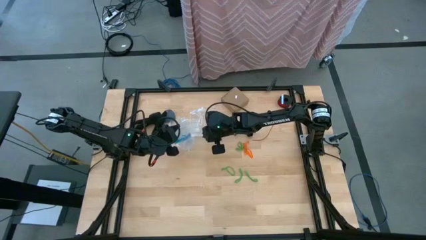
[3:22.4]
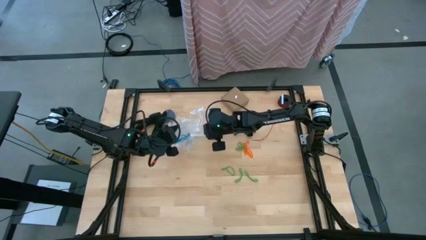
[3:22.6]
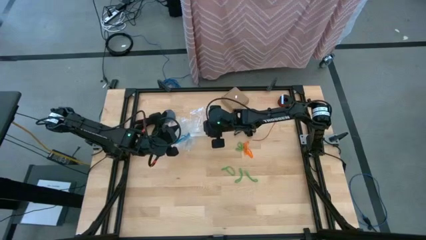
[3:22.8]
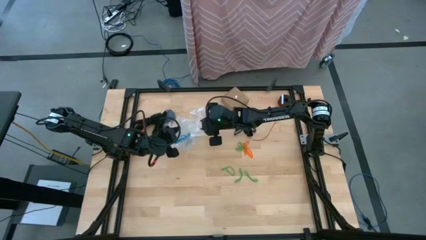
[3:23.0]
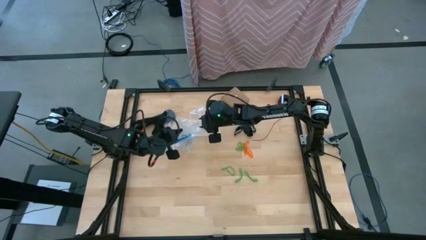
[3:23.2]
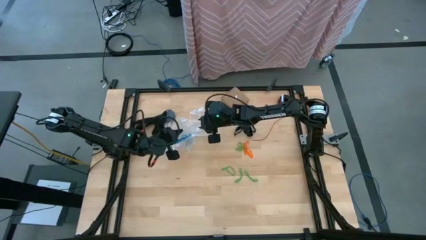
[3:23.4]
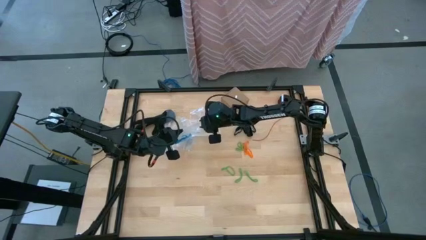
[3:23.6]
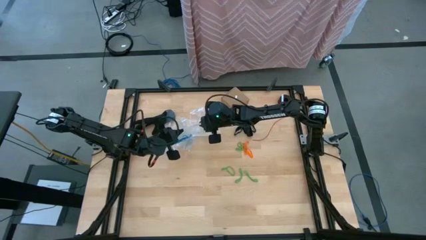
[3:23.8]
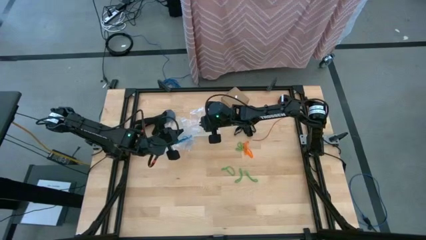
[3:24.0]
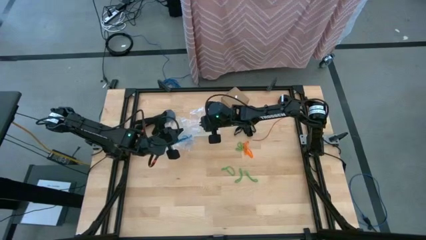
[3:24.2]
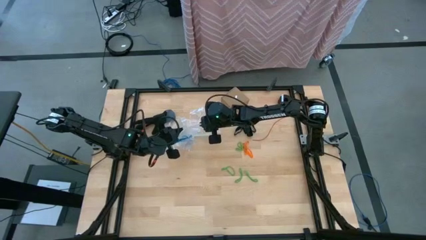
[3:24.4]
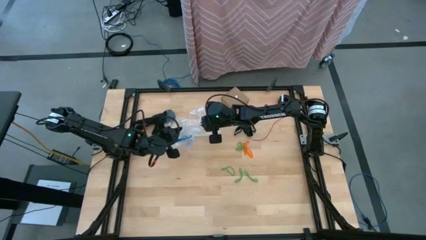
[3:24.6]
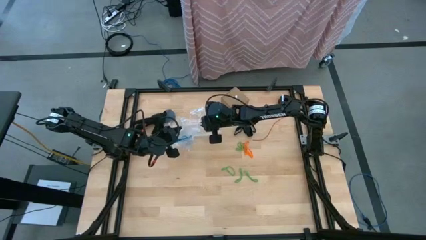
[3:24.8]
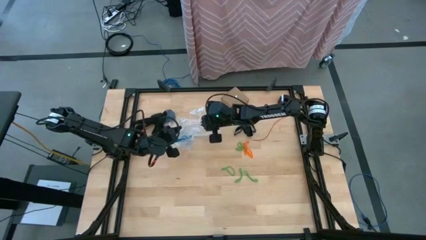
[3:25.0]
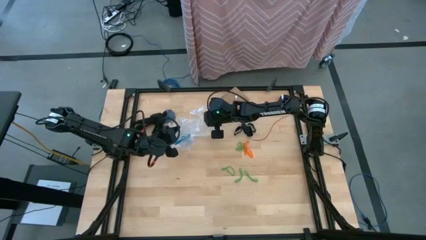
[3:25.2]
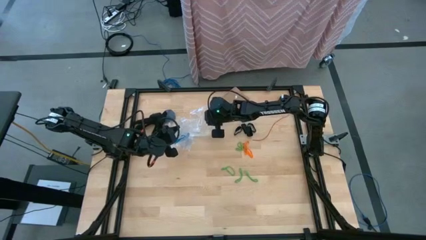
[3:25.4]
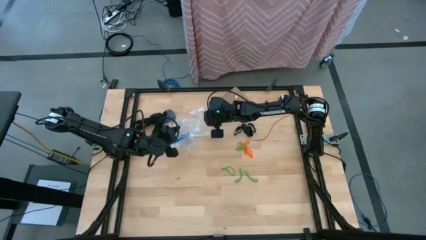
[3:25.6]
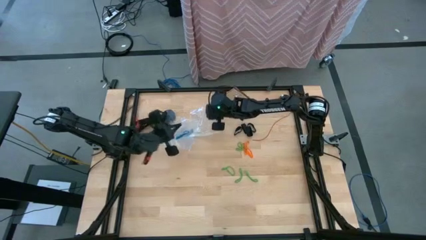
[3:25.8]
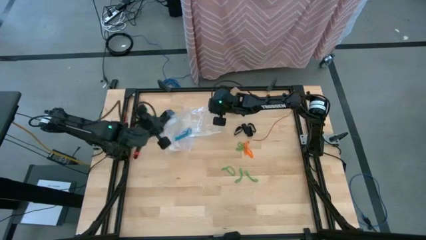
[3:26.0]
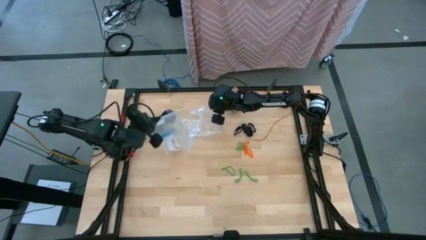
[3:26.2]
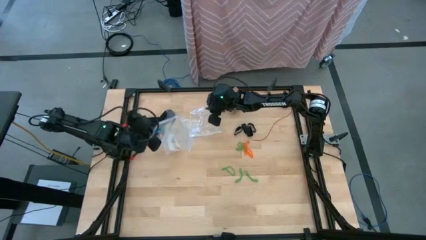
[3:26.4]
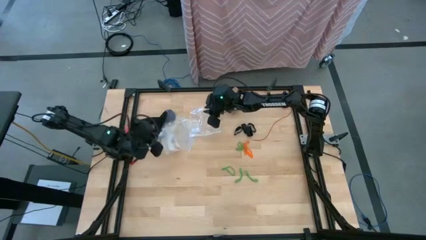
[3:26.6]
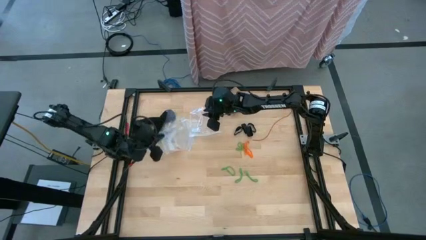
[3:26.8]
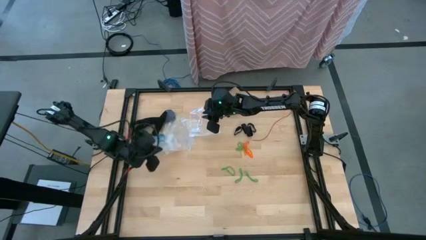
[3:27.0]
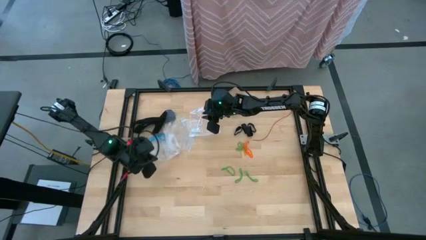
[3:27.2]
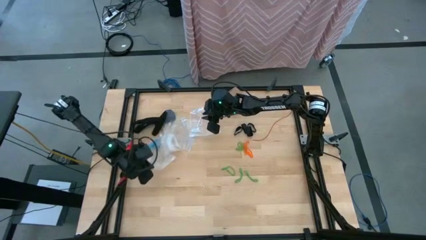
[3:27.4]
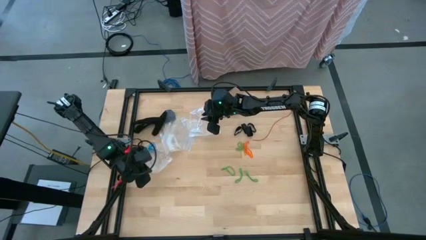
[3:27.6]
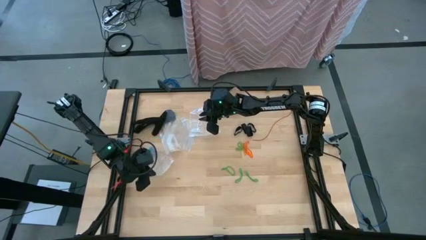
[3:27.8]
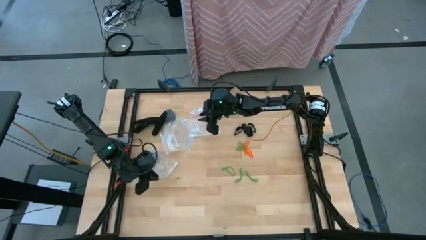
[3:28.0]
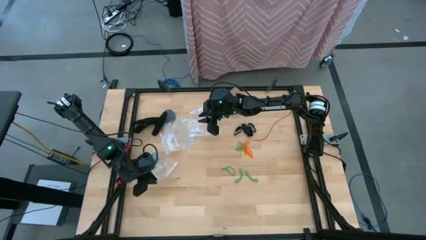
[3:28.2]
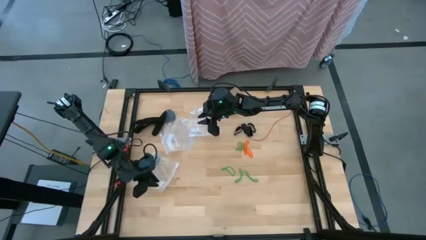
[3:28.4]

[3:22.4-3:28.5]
Task: Sort rubber bands
Close the transparent zip bag

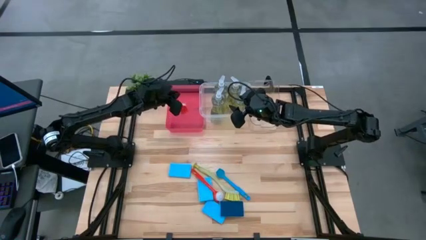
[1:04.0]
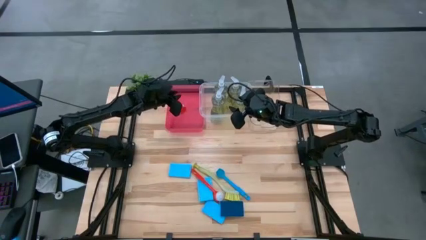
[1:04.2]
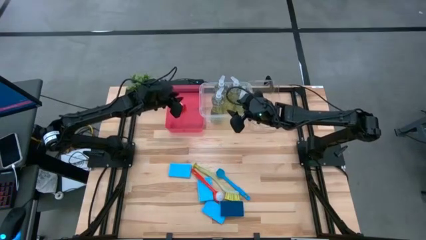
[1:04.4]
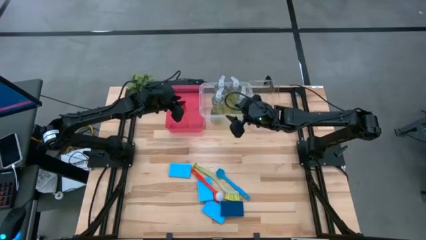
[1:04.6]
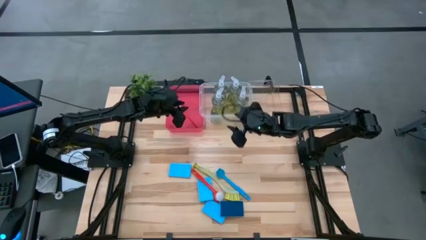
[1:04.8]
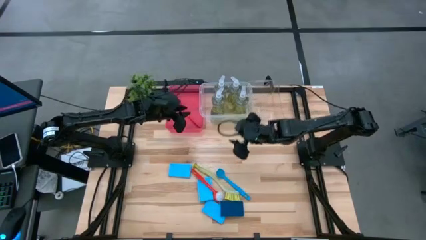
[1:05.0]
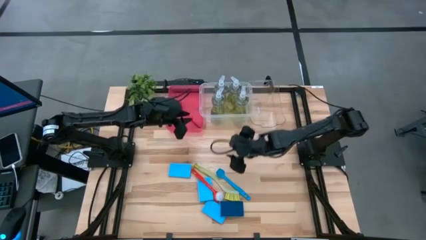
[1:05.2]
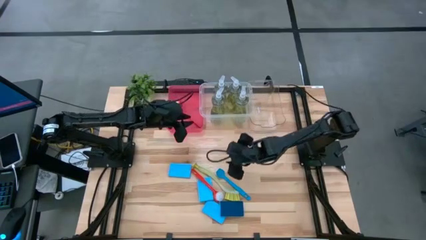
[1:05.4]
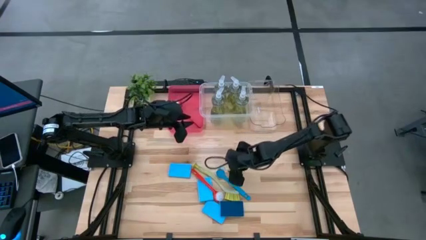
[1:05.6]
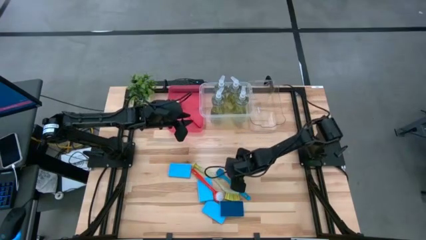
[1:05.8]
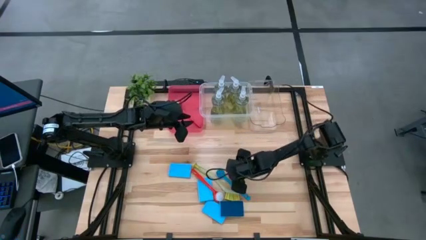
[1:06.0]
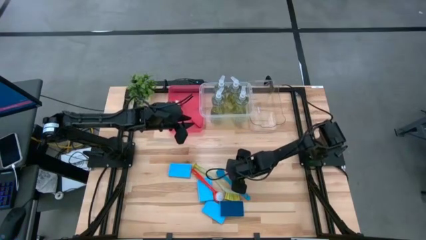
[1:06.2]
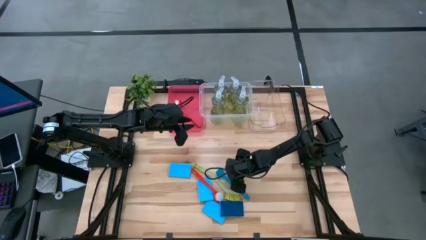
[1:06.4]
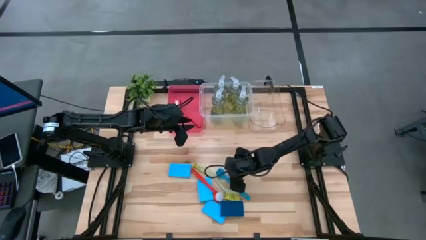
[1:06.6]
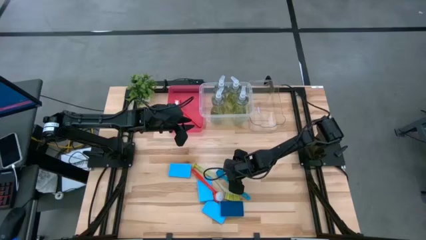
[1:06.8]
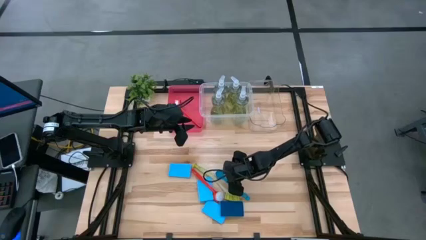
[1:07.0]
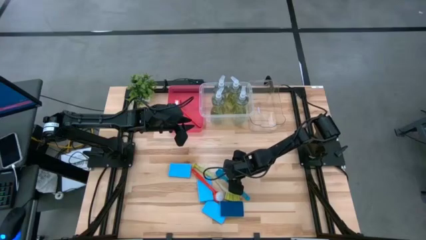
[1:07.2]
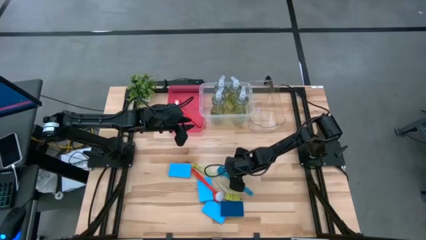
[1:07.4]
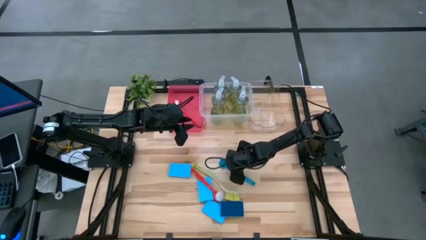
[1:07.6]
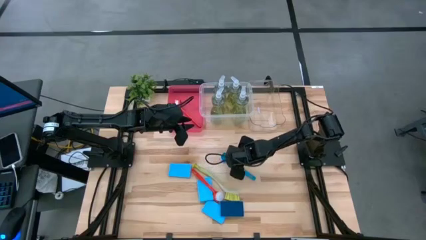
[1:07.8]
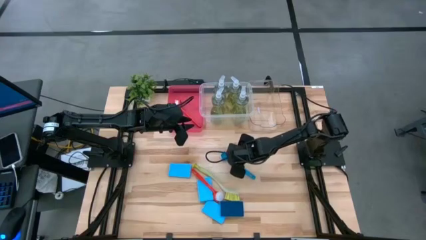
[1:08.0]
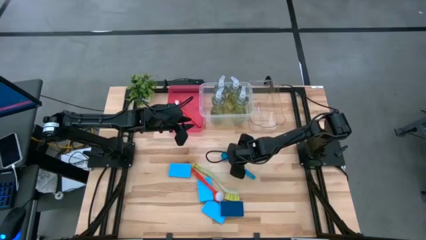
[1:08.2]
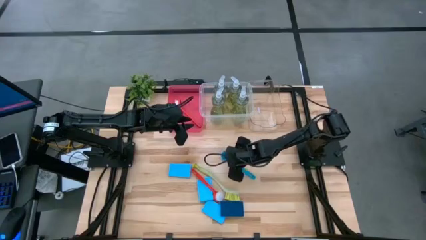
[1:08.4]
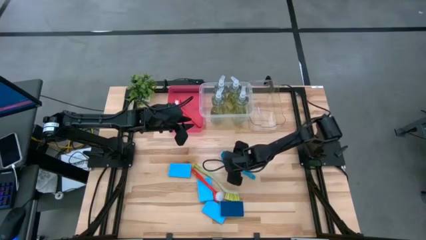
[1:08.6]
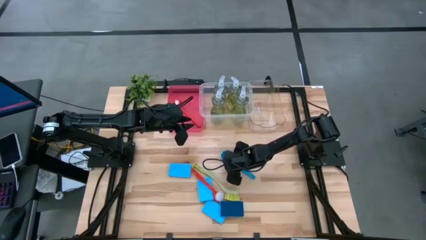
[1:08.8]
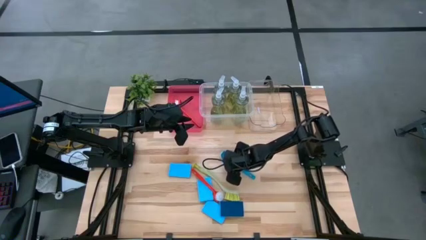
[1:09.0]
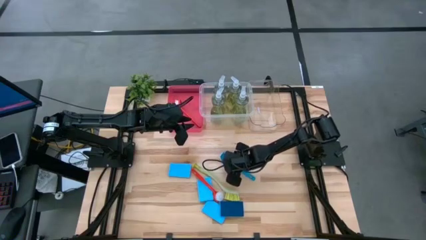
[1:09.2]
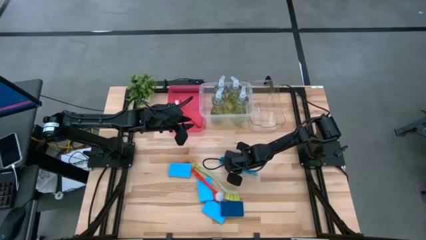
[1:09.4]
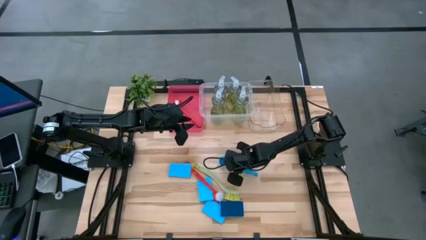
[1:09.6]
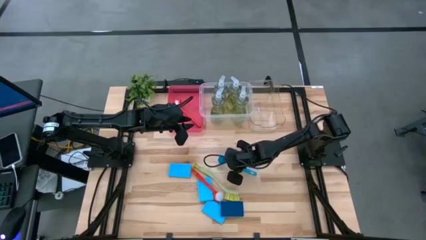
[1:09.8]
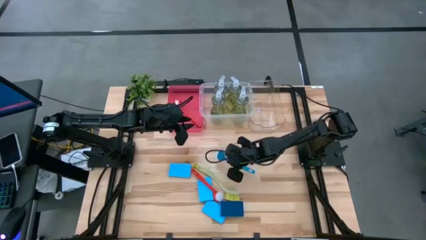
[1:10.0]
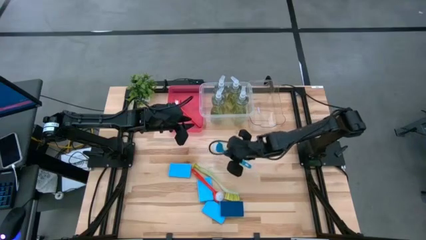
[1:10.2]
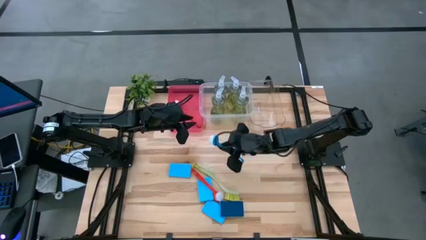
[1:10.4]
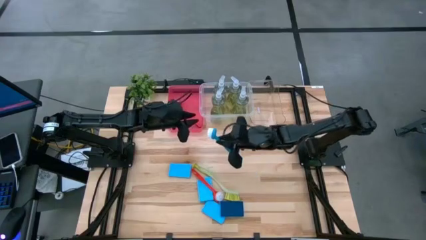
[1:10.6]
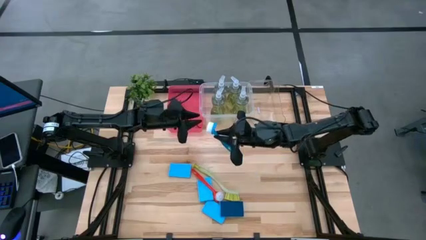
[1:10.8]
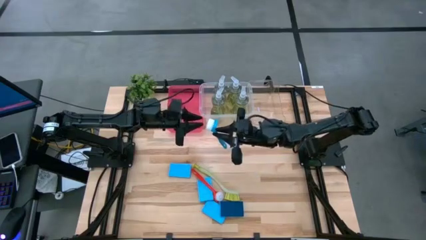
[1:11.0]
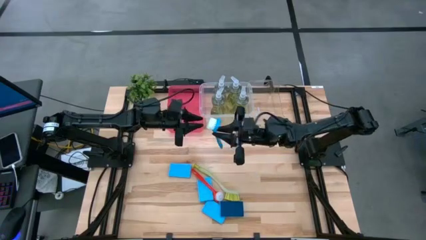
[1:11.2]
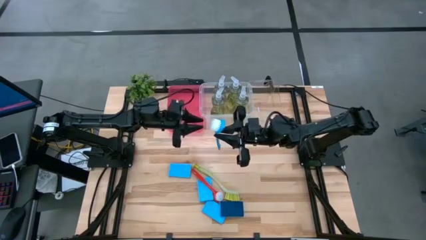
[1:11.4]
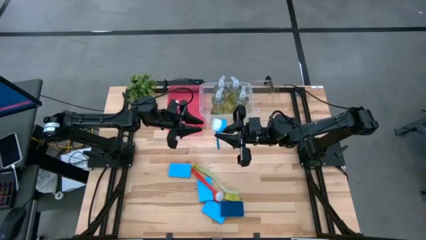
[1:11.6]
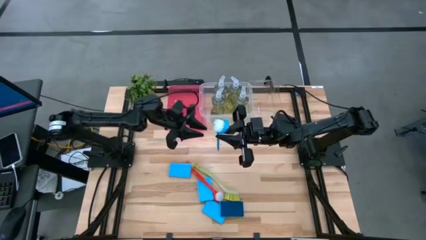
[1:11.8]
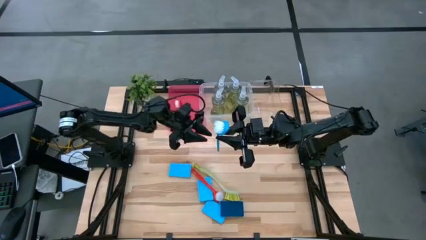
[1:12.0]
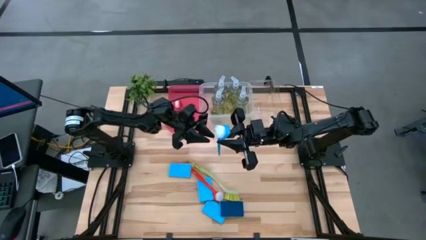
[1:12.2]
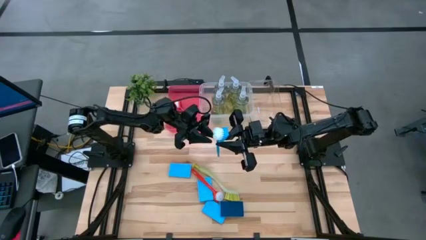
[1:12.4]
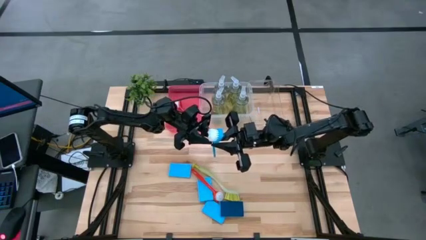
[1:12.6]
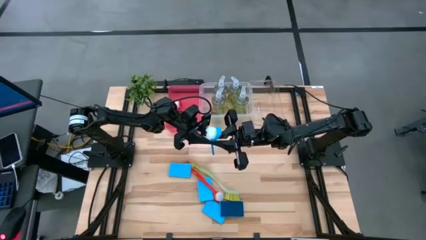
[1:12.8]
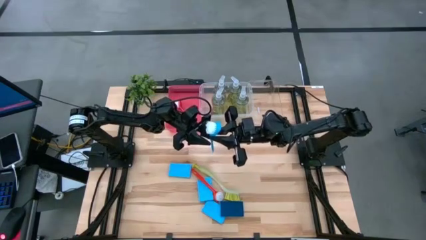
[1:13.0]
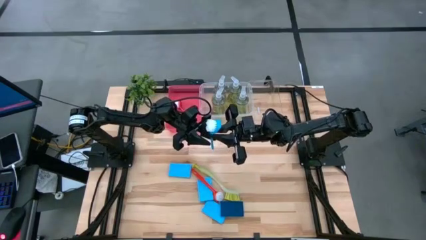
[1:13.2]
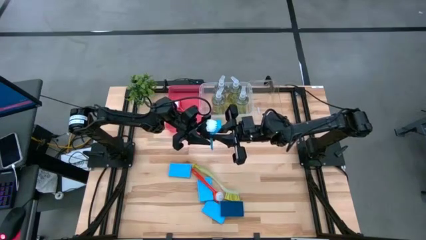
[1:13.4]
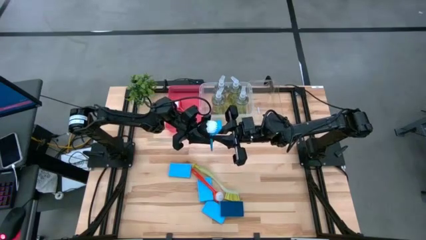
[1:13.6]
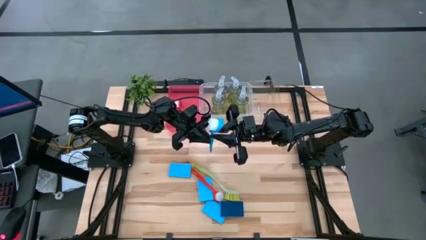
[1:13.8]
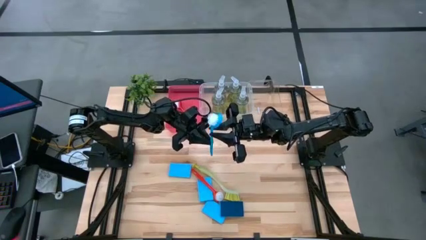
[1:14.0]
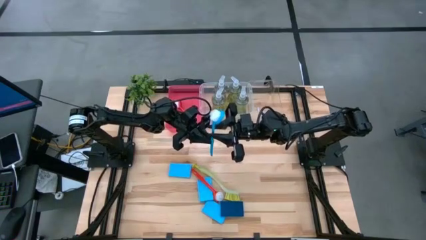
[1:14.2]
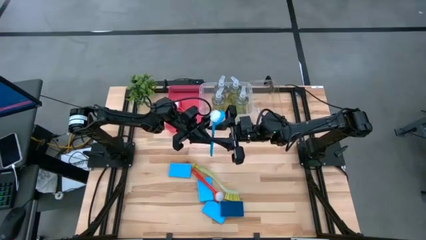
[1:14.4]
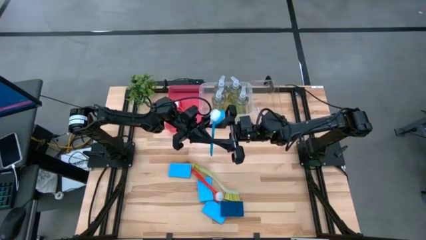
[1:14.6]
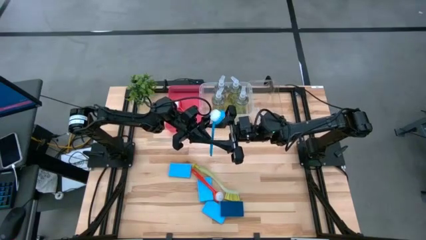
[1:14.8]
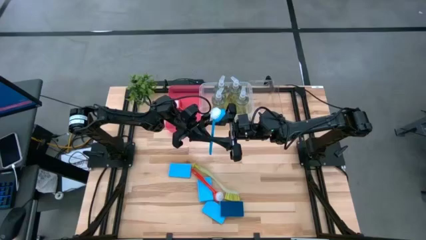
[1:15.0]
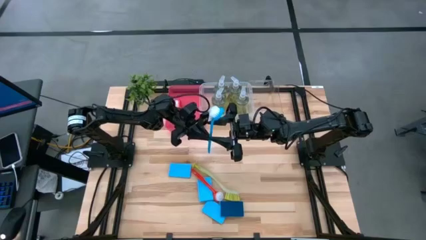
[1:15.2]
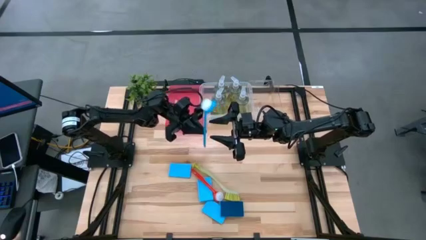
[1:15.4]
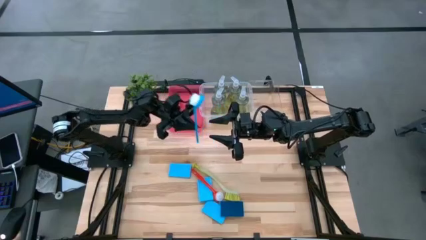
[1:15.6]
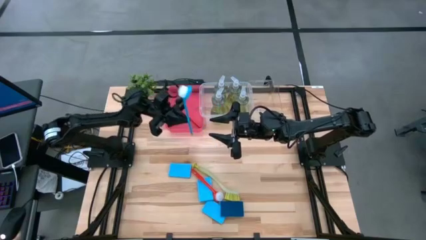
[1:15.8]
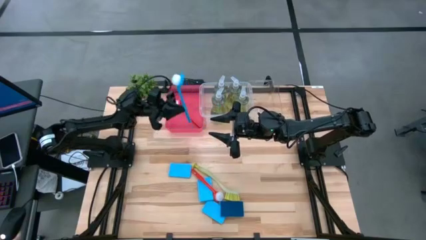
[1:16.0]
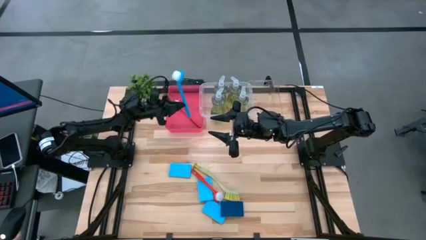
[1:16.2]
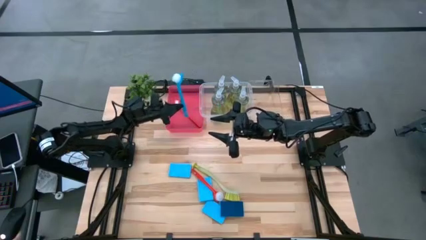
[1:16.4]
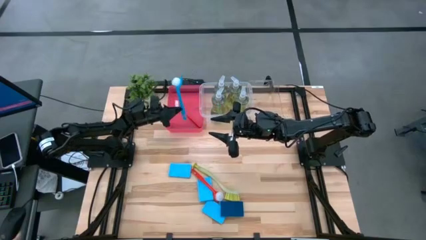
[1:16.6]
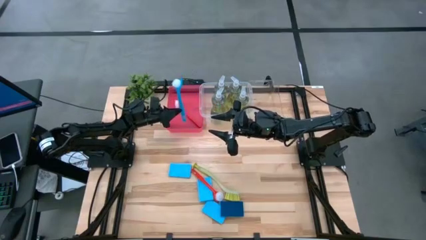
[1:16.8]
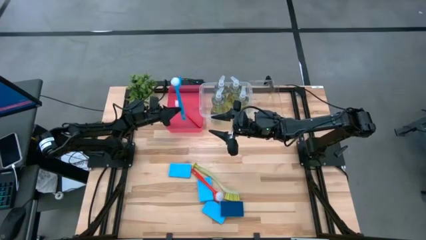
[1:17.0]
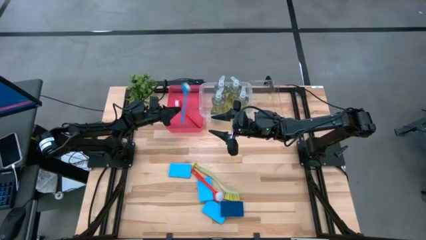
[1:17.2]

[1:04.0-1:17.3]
Task: Pick & Place Kitchen Sink Supplies
Put the blue toilet brush into the red bin
